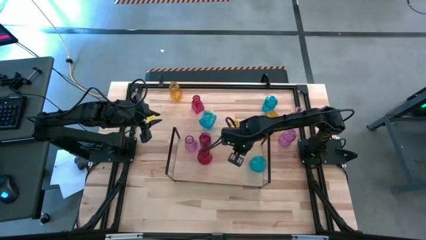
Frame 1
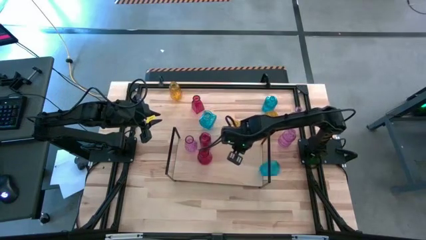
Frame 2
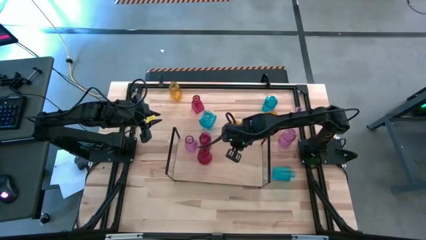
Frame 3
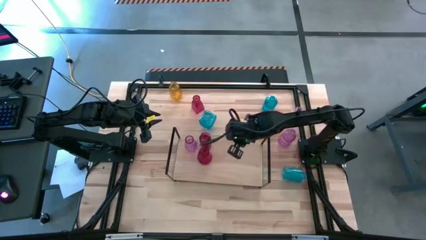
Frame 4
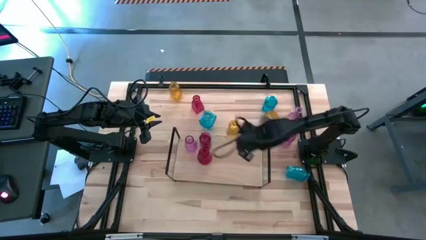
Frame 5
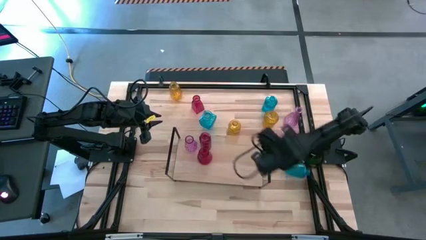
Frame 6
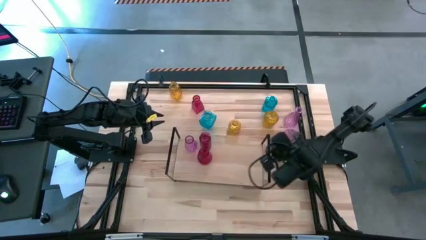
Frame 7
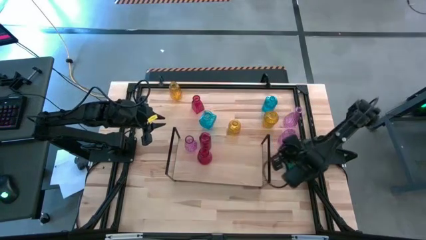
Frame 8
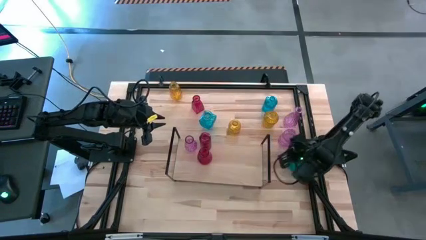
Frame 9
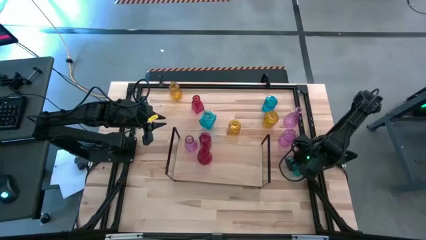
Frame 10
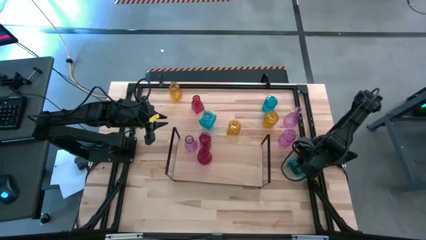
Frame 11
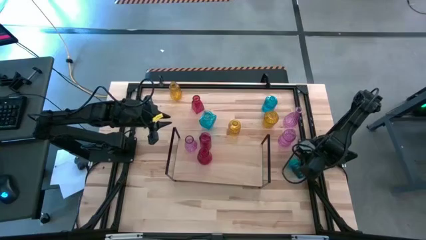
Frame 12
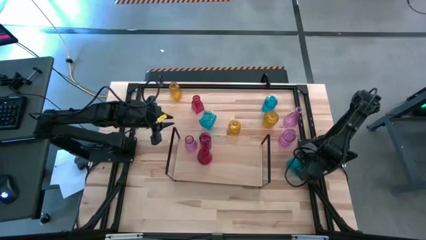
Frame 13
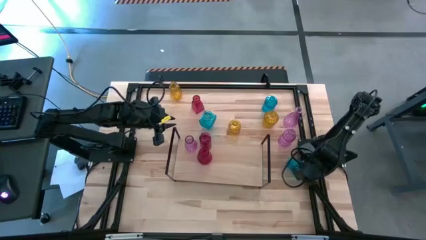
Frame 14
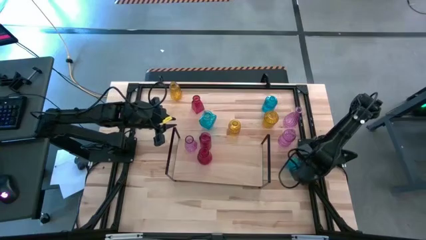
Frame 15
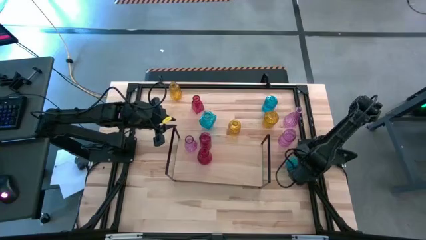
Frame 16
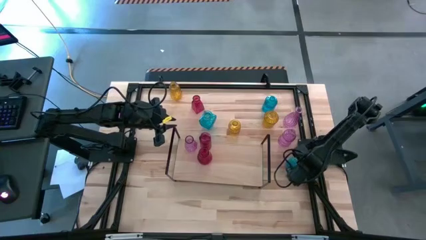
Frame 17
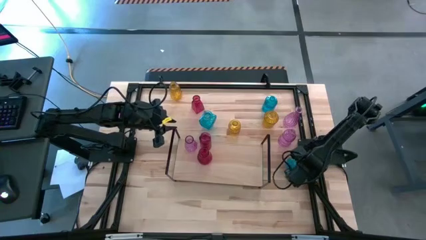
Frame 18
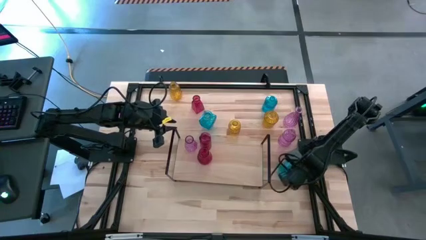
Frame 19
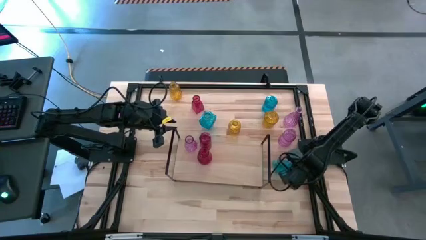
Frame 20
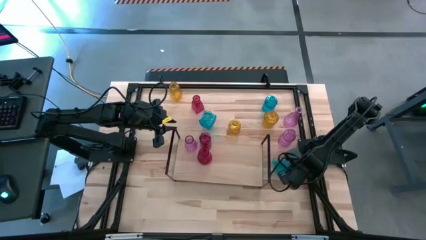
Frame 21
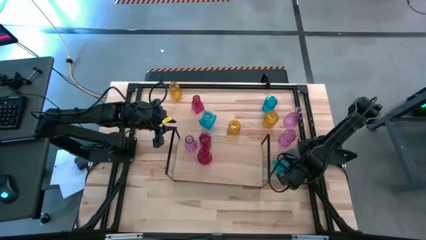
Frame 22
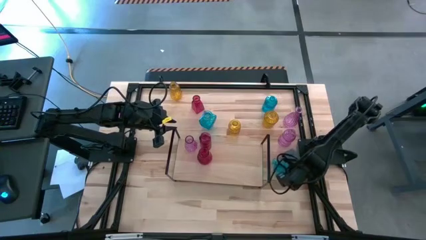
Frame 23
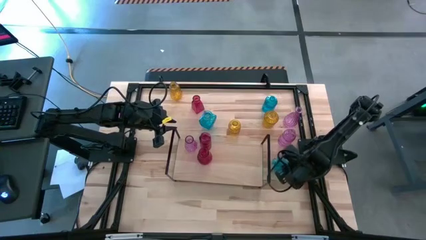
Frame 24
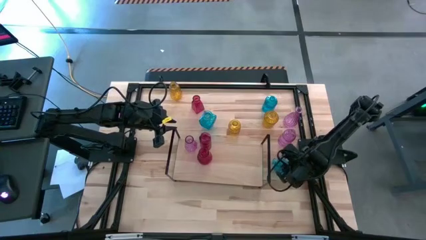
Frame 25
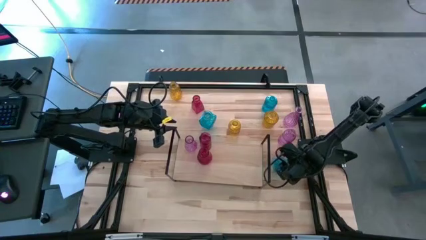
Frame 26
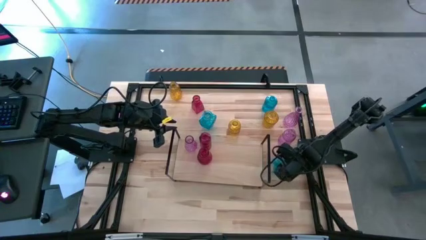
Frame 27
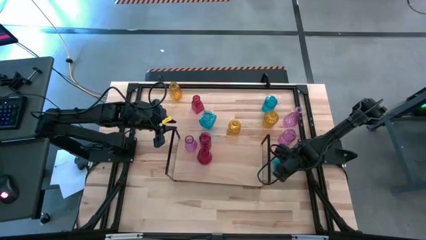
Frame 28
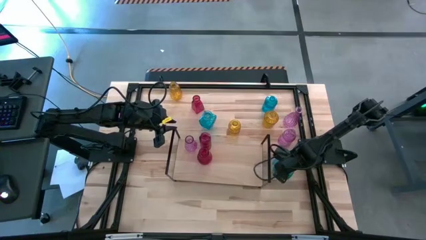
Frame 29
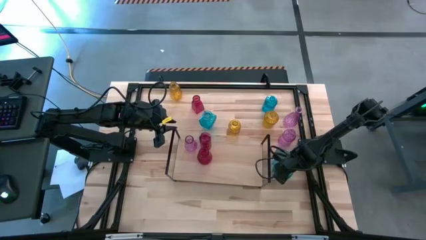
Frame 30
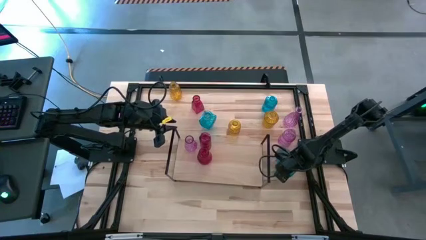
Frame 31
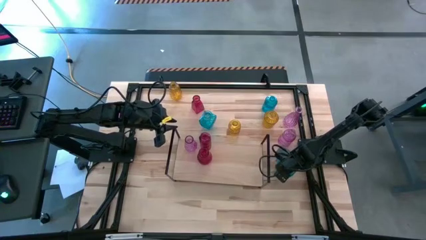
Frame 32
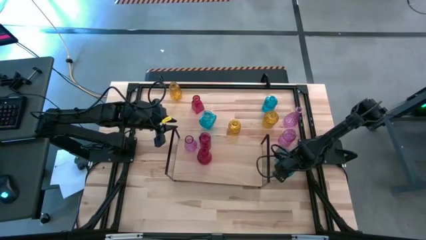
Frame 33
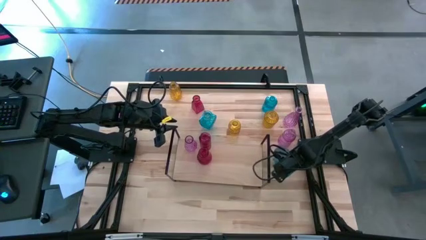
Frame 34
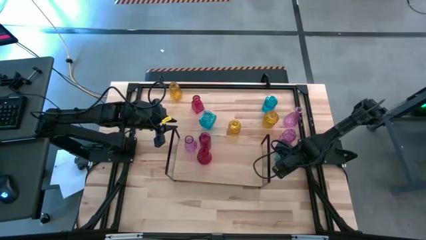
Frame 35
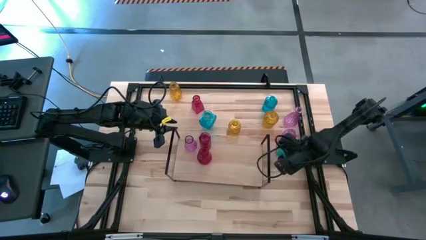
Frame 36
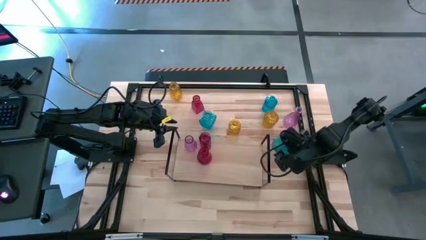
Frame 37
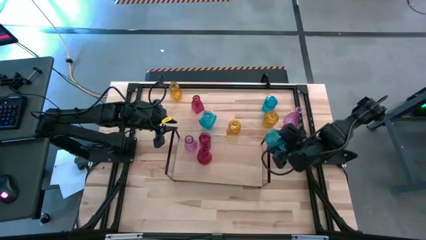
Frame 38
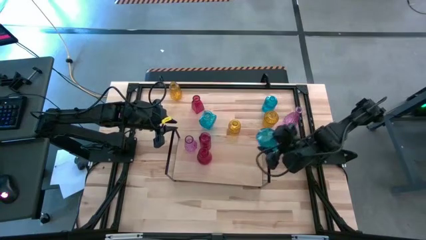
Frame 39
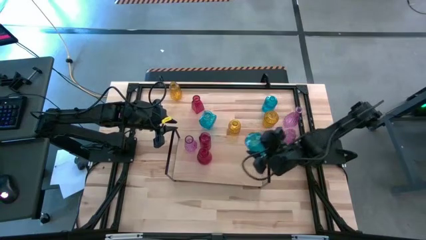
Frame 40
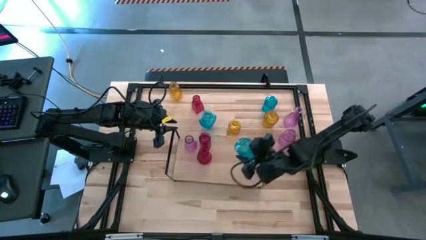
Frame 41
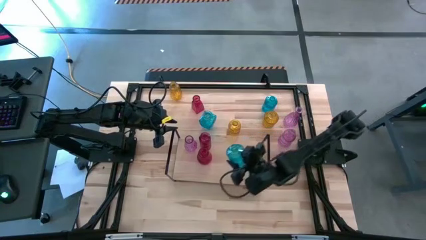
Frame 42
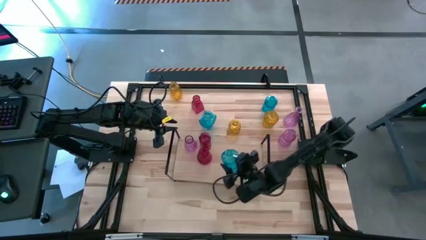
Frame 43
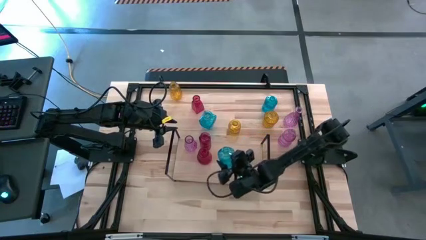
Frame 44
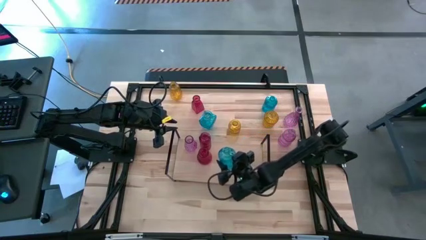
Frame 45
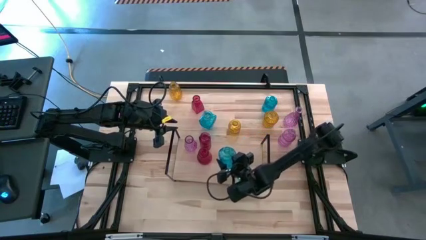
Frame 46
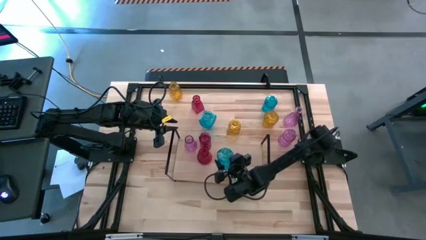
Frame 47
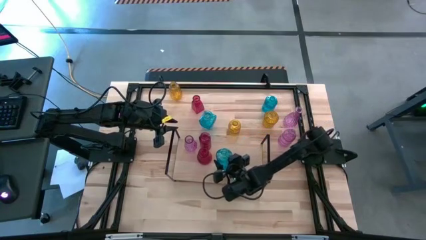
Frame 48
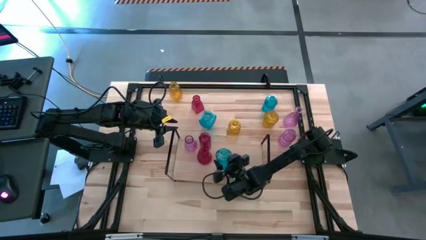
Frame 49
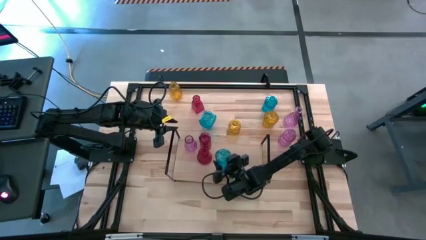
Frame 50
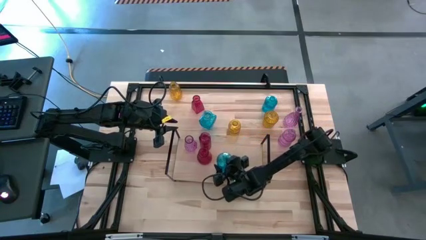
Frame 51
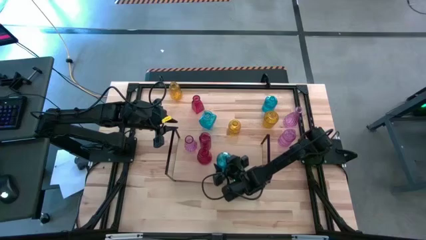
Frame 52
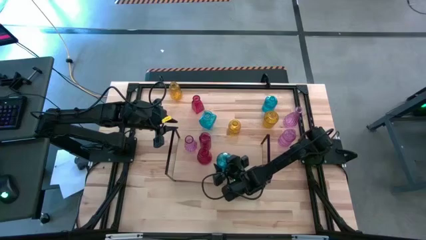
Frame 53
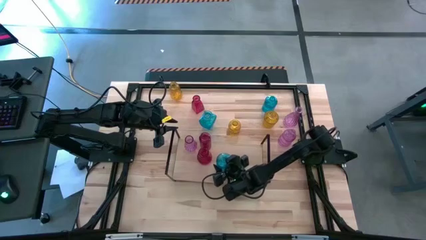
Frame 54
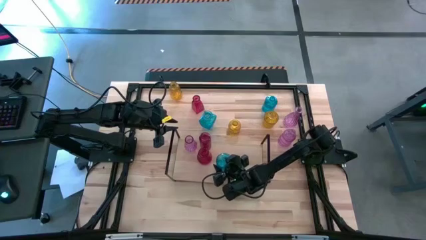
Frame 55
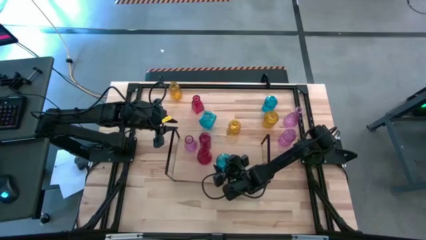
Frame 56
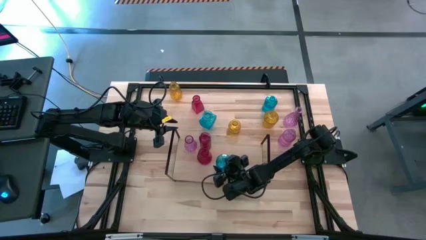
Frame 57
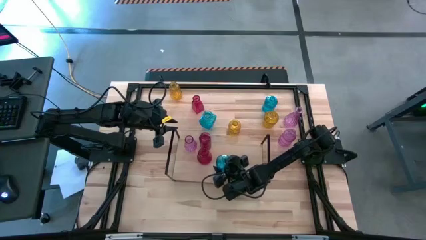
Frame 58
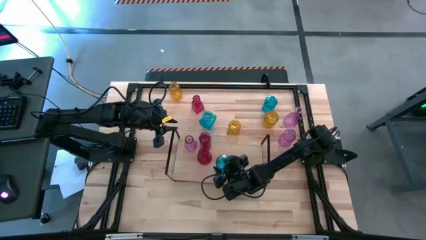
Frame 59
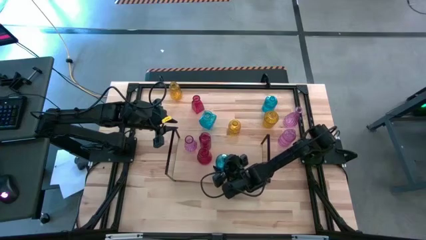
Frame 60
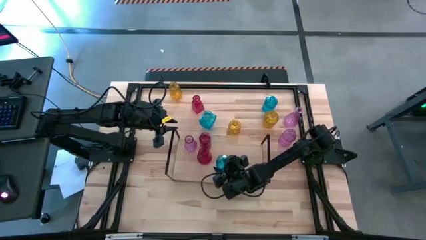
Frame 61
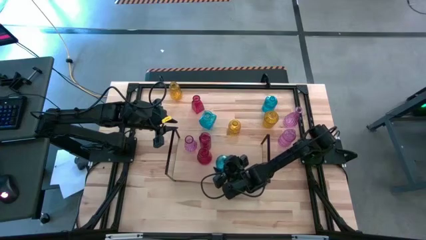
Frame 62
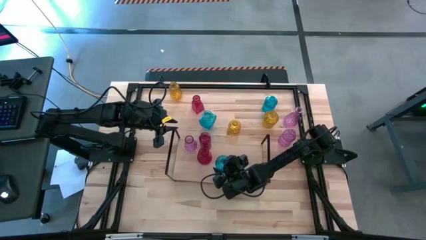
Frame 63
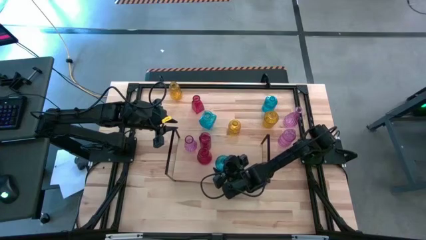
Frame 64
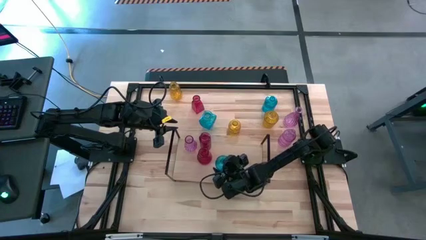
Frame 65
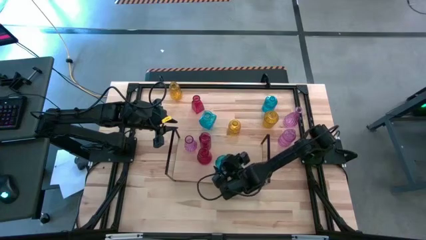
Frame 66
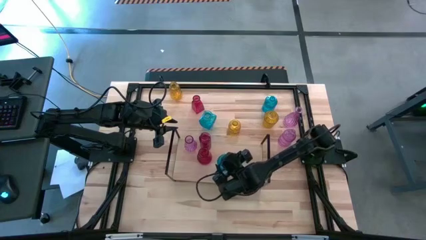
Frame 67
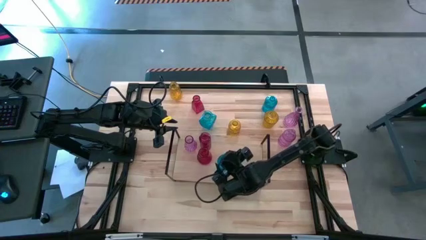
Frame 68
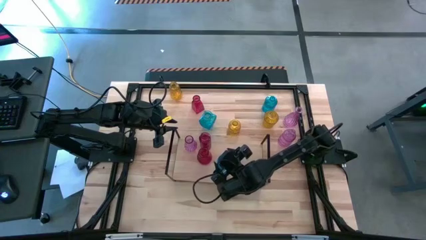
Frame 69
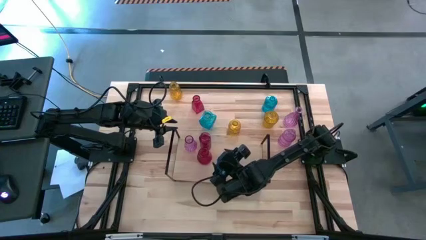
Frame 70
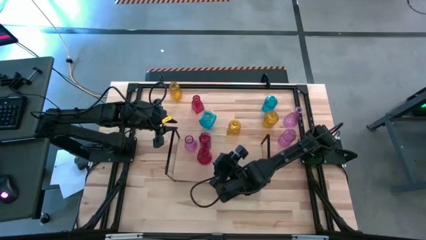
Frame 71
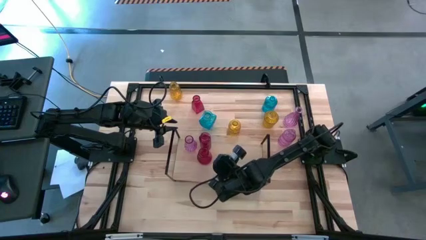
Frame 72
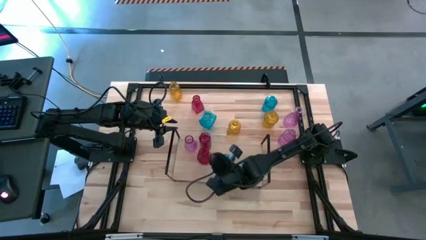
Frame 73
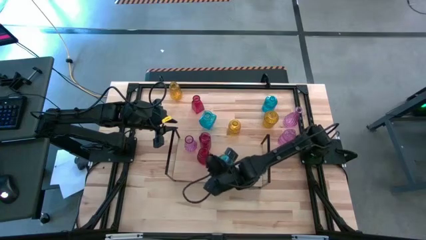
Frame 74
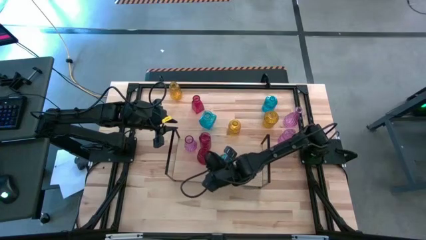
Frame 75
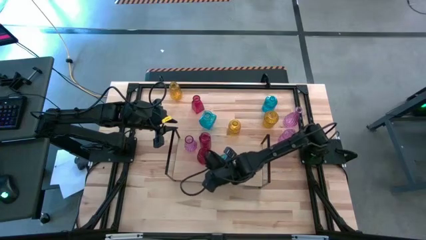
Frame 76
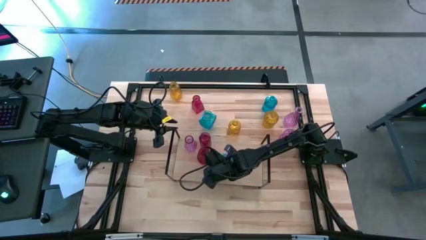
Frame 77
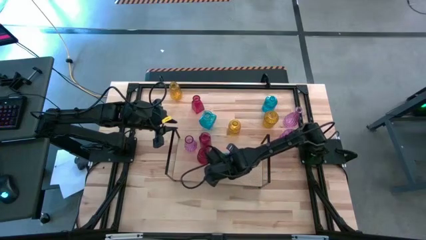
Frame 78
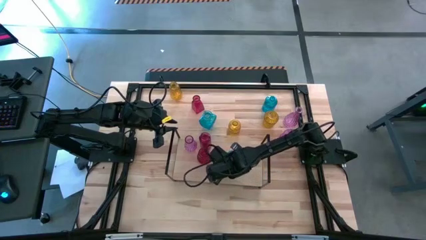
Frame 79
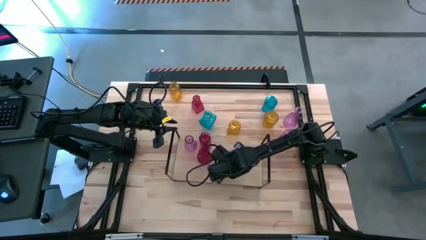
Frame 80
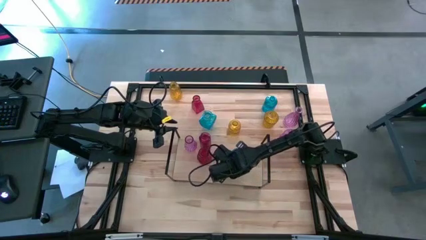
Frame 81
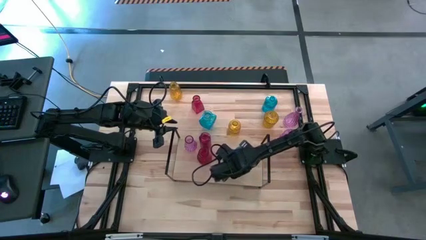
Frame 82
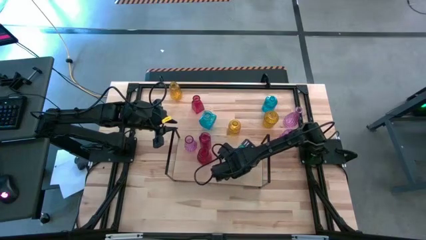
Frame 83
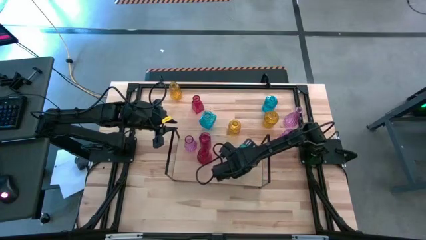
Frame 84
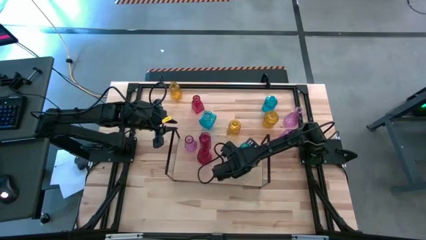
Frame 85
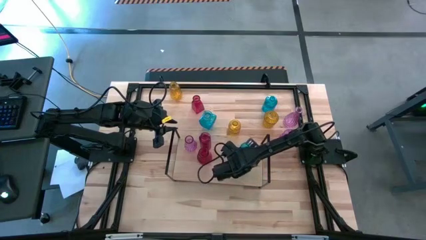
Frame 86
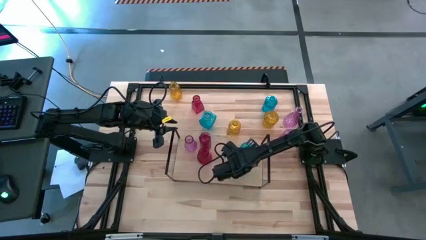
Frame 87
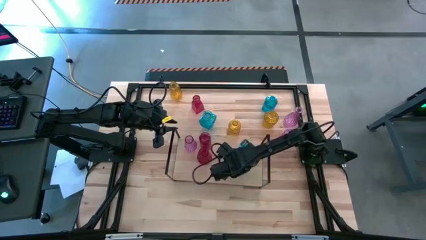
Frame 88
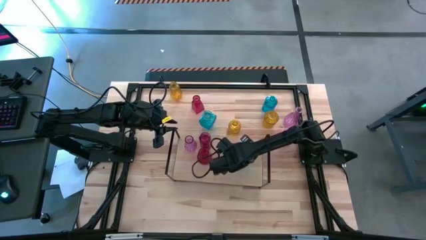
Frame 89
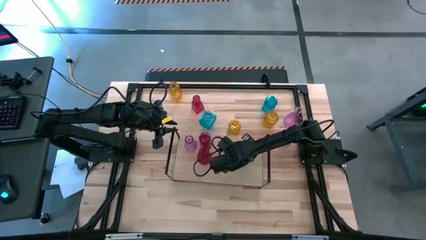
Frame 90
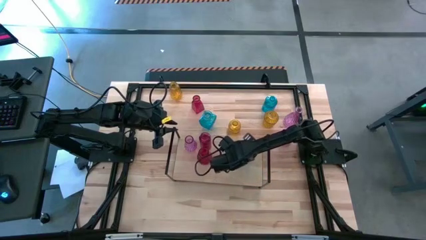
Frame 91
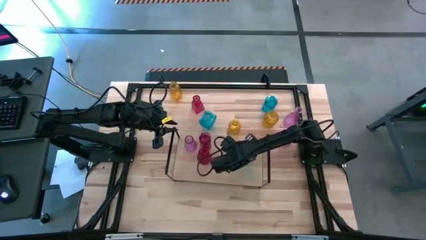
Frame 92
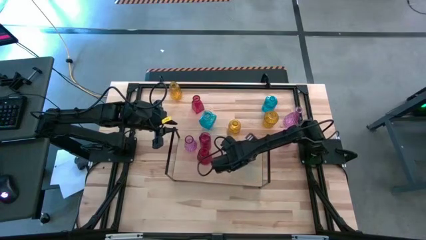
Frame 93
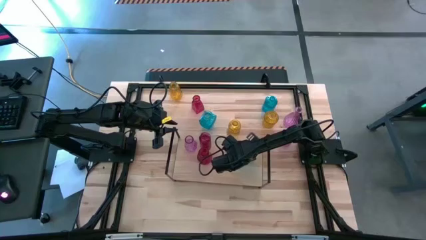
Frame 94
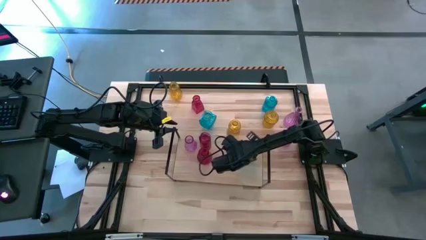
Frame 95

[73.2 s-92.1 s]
Task: sort vases onto shelf
Put the top left blue vase on the shelf
